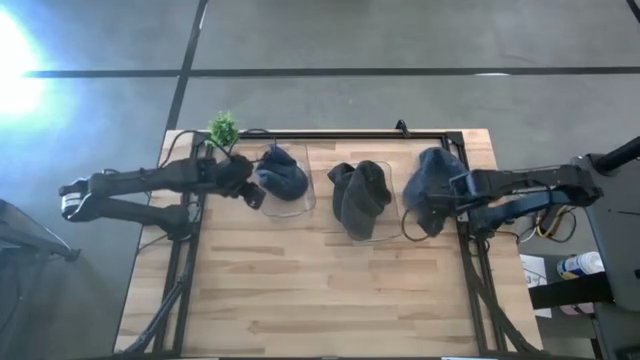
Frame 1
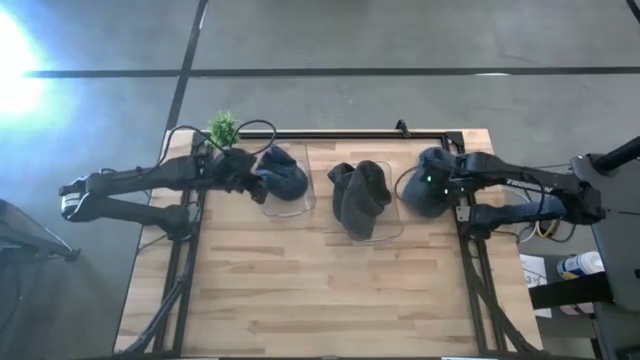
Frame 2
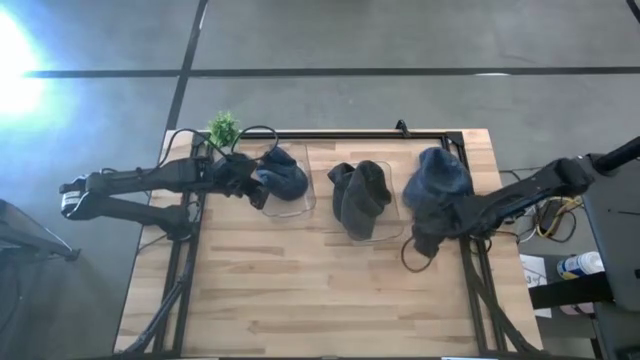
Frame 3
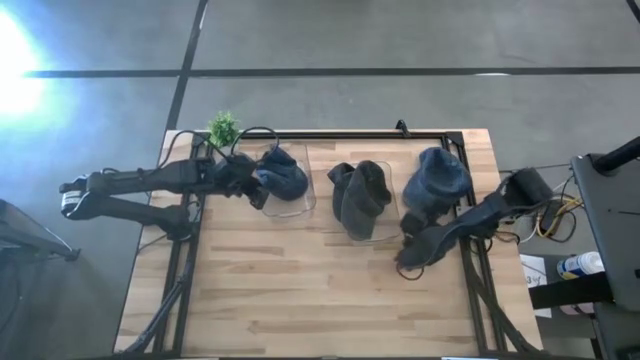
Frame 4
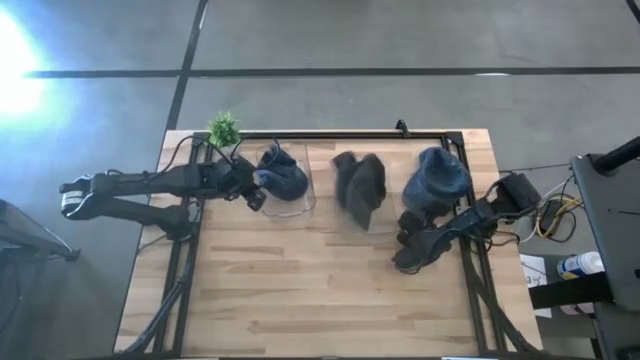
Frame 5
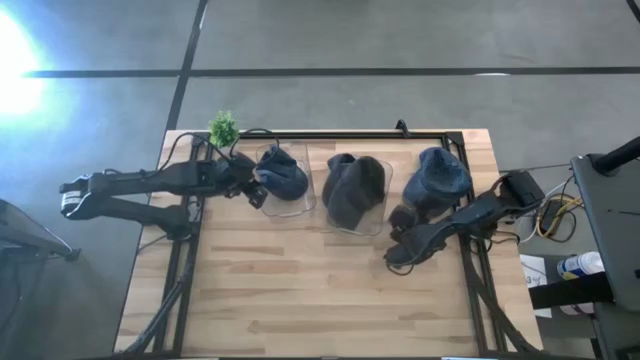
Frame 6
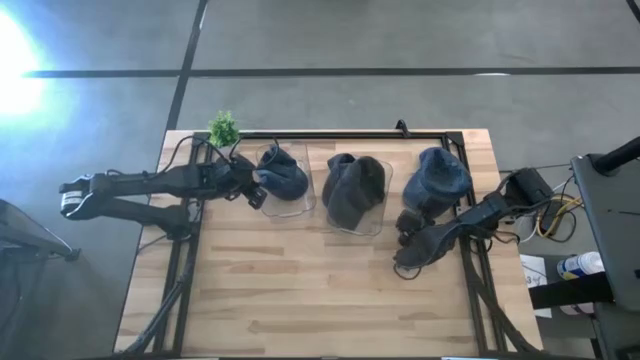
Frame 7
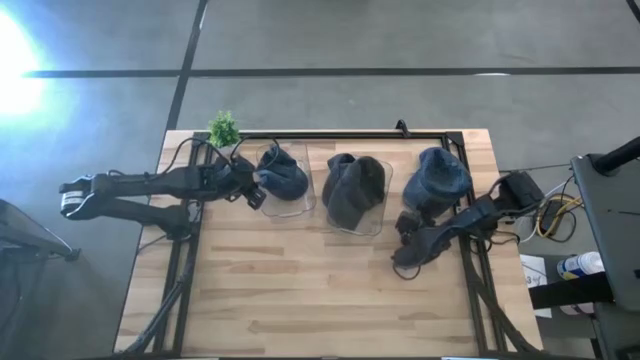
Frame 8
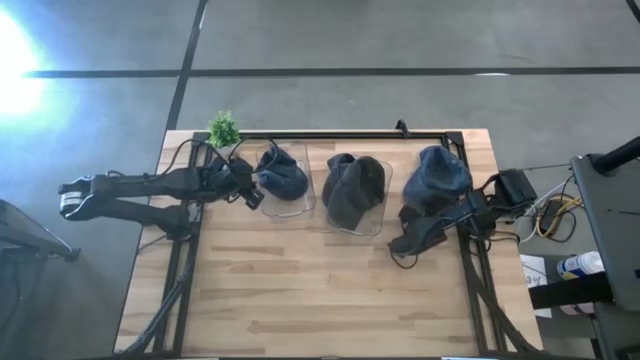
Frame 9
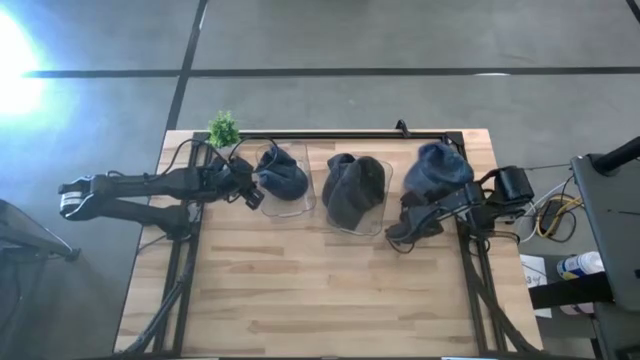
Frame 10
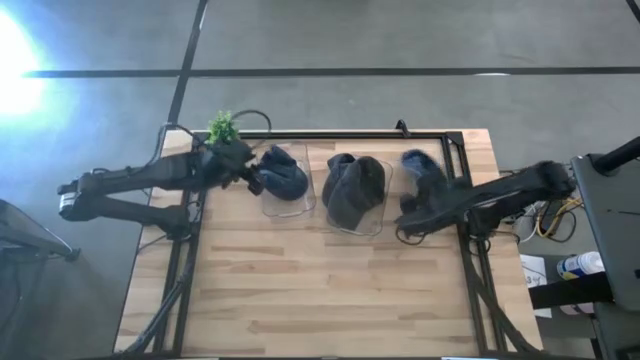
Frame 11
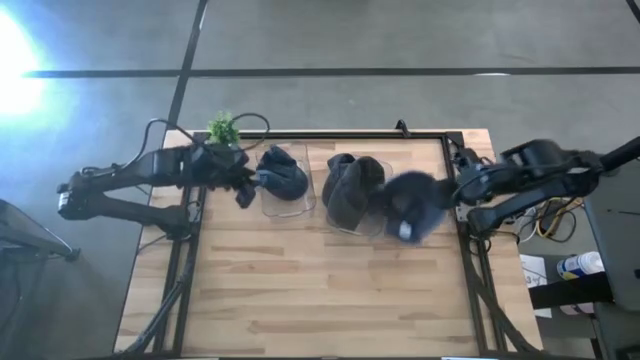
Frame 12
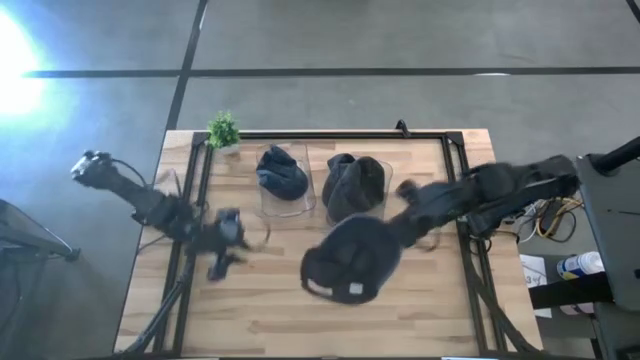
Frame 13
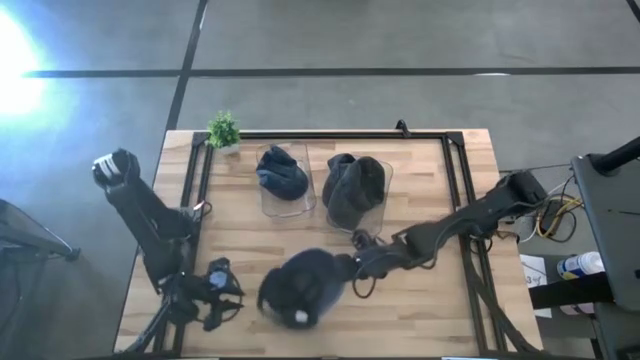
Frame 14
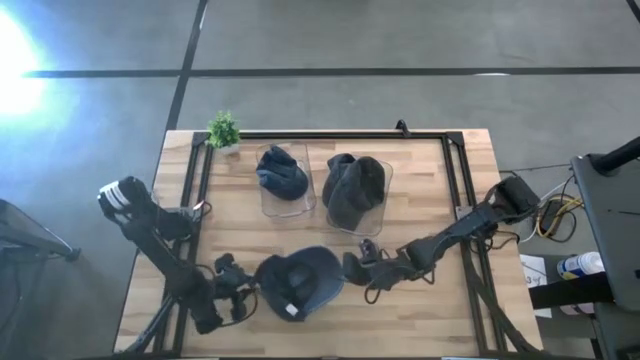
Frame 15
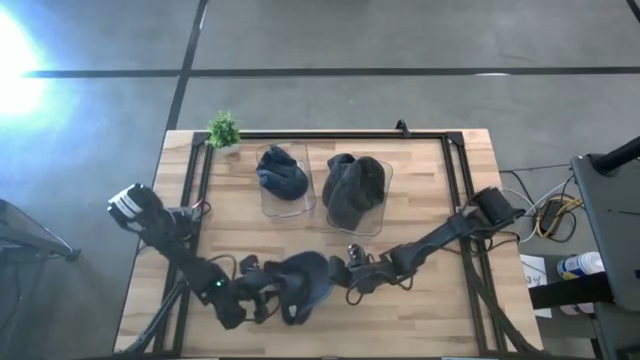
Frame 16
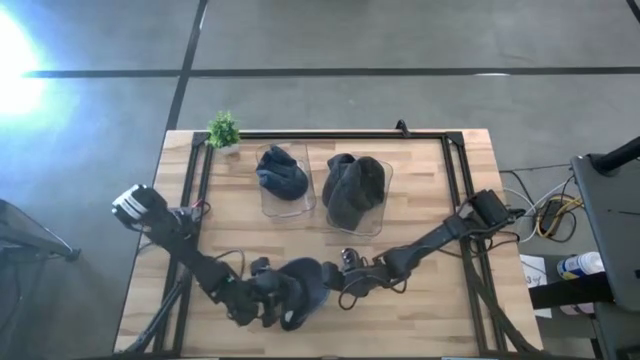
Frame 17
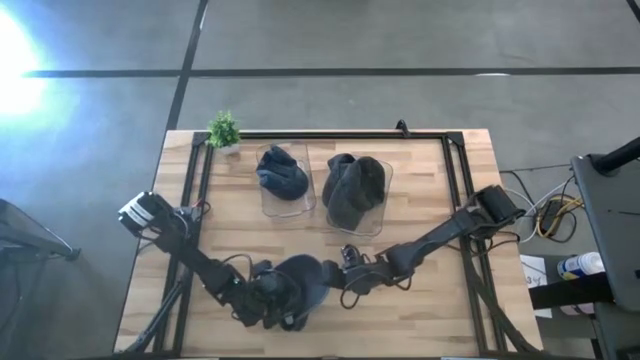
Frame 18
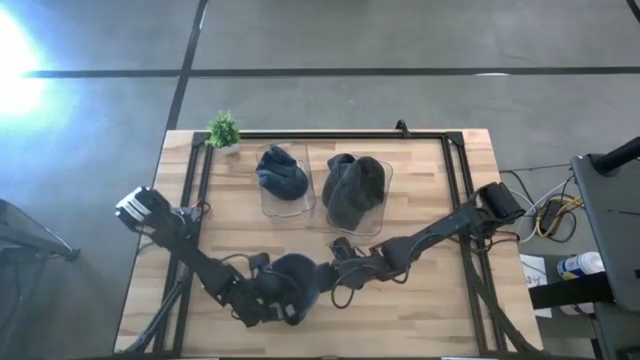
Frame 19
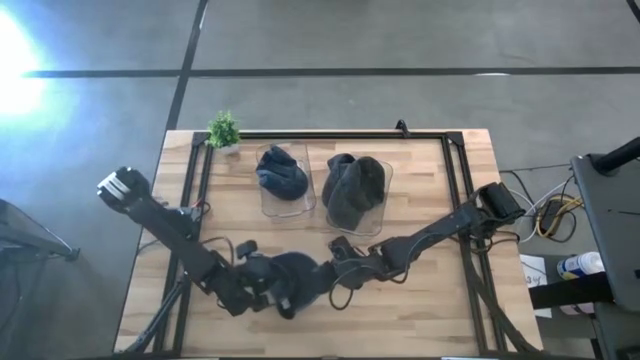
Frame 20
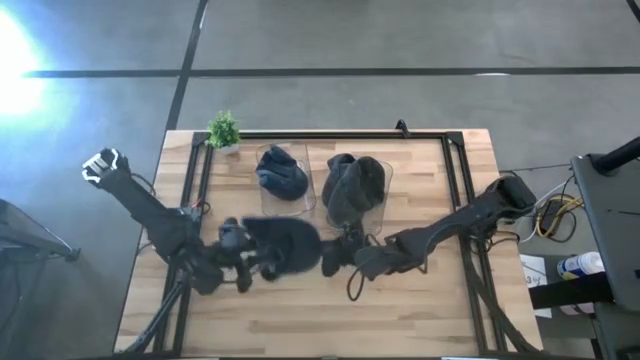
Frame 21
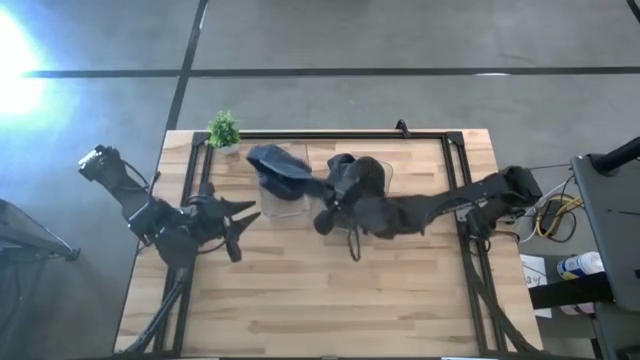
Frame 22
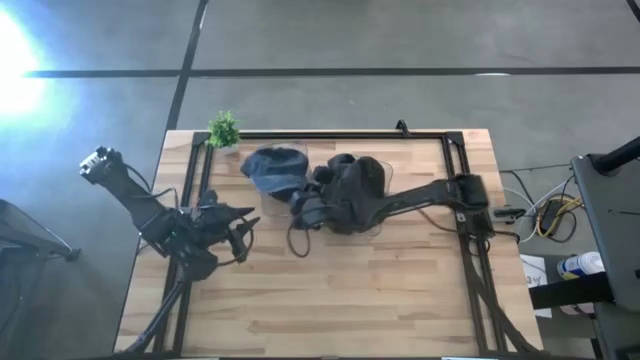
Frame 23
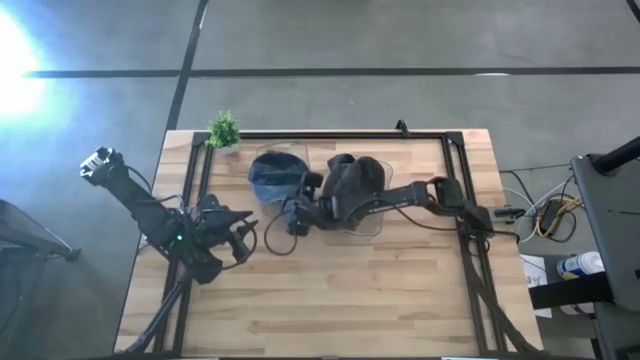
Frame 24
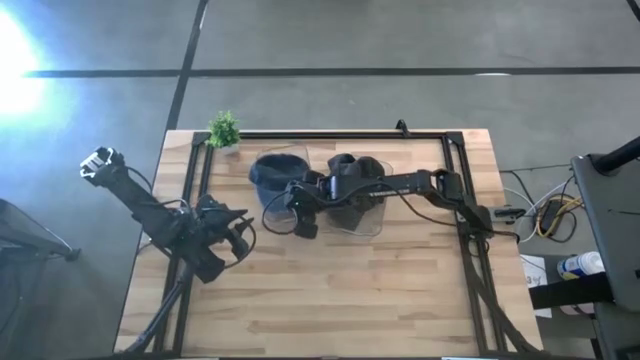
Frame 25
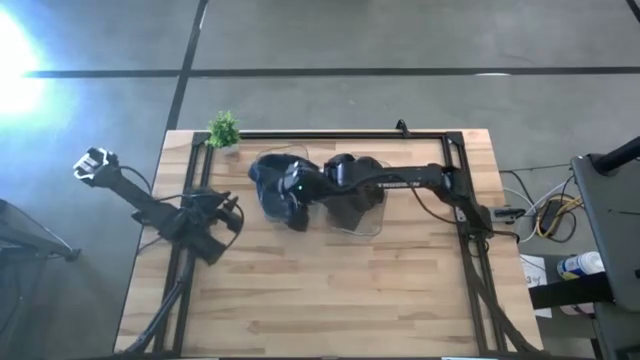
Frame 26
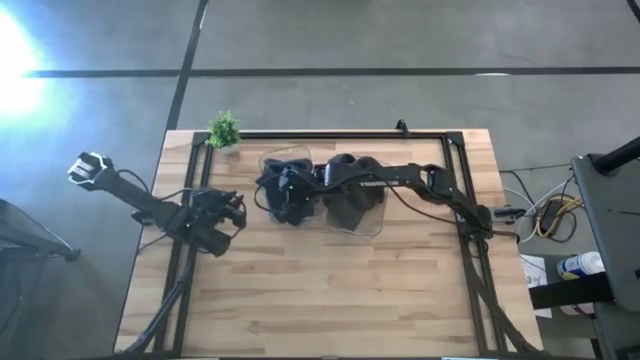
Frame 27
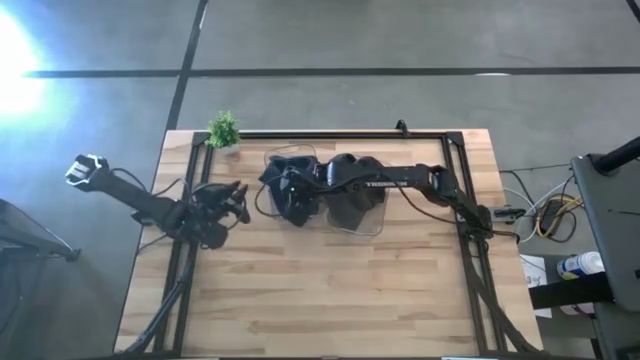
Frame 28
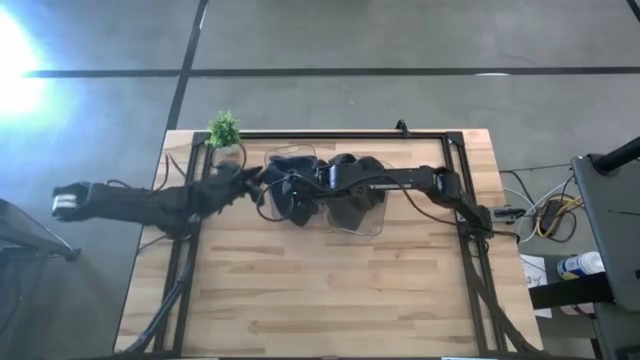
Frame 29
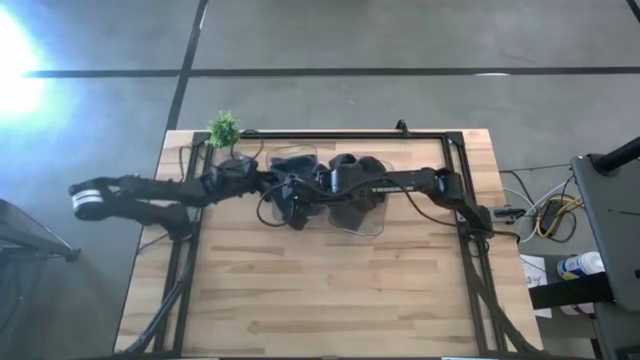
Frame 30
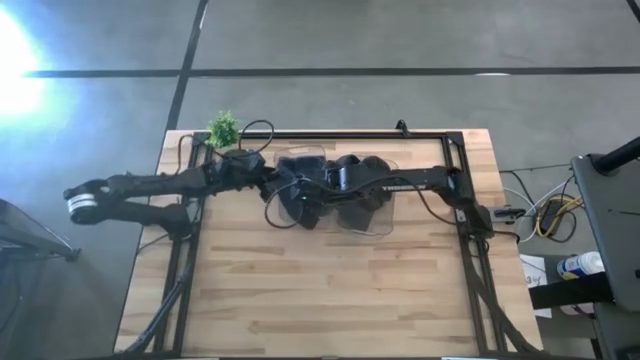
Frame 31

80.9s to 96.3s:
Task: Pick & Place hat
Put the blue cap into the left transparent bin

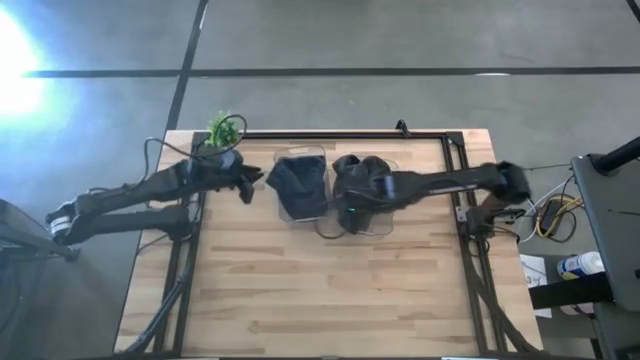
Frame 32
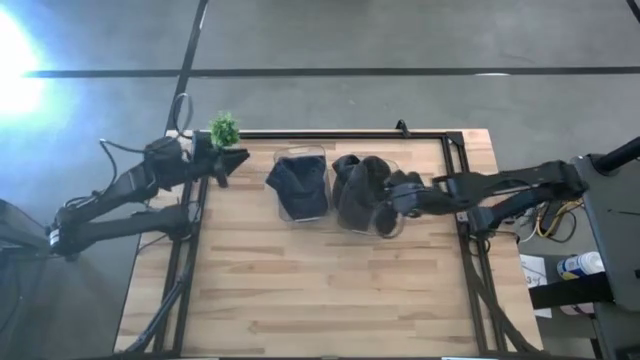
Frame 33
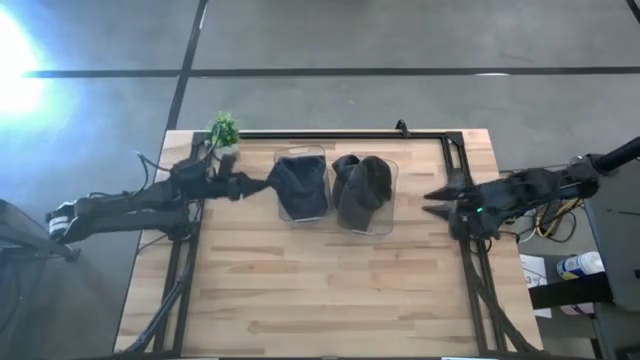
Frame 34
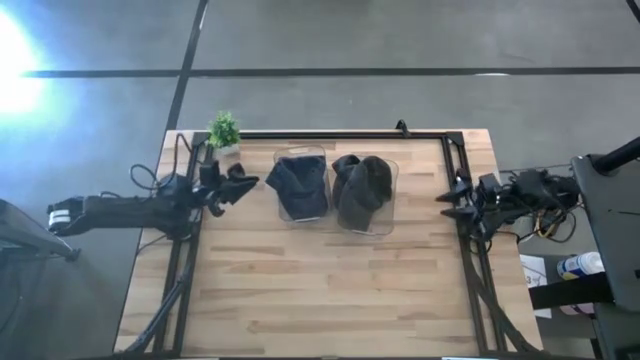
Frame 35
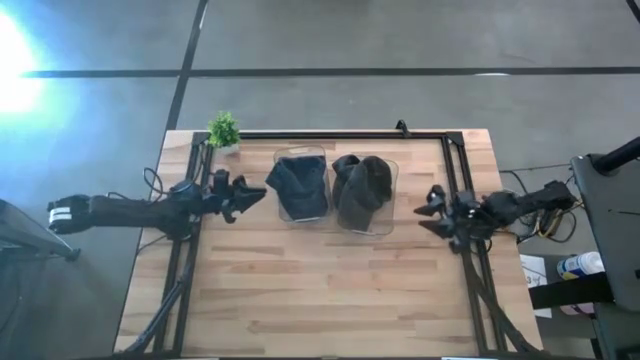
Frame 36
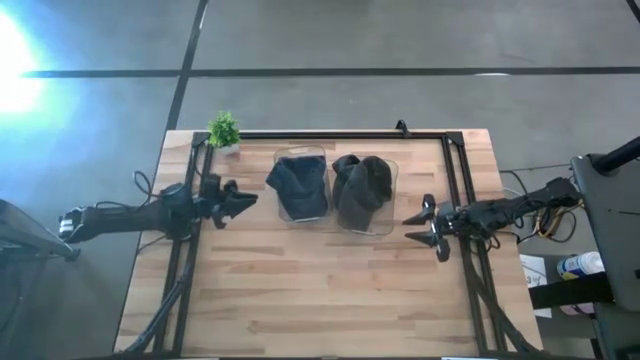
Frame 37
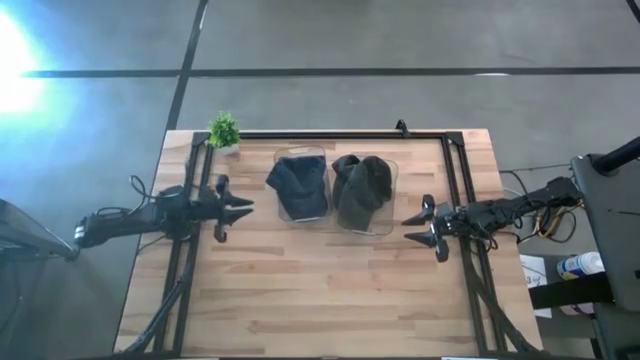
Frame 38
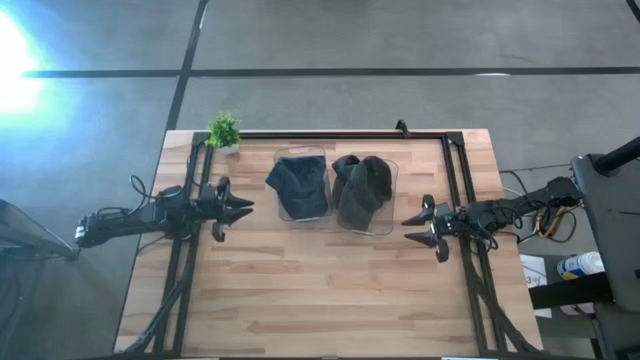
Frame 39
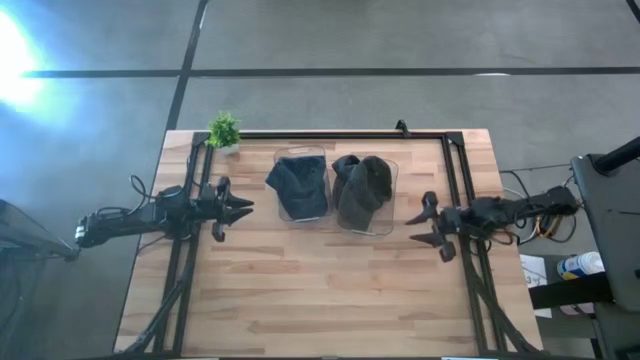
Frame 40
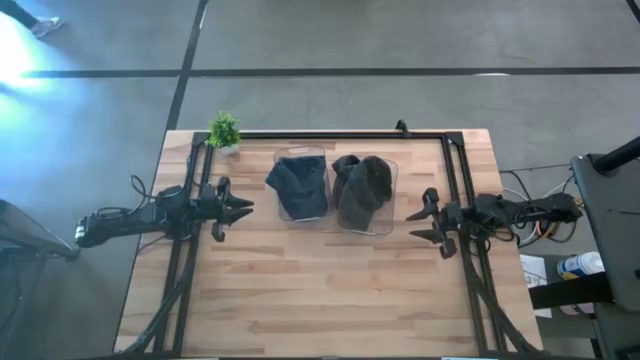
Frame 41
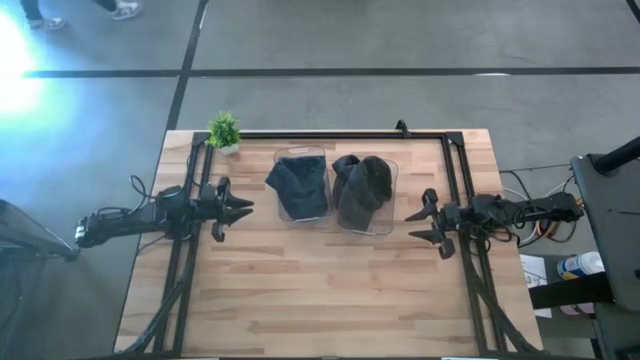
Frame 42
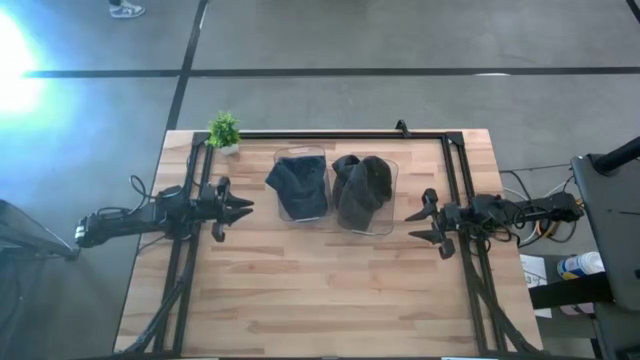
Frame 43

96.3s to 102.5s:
Return to Home Position
